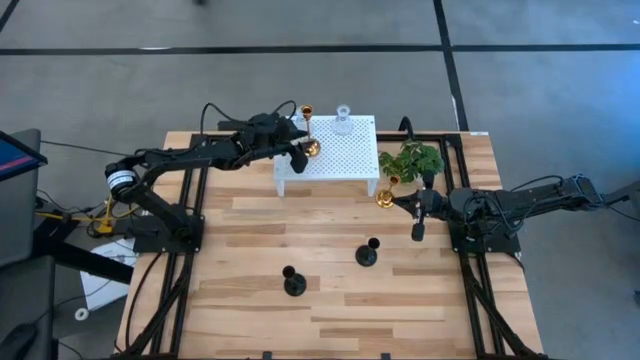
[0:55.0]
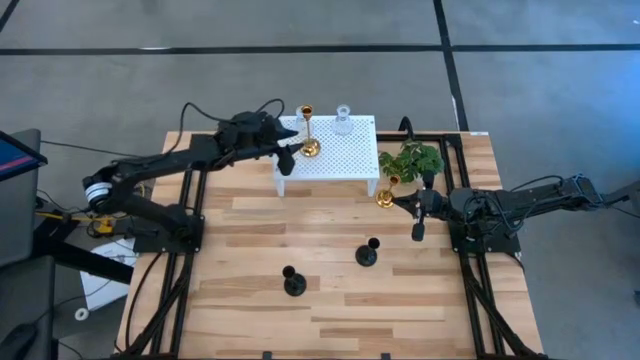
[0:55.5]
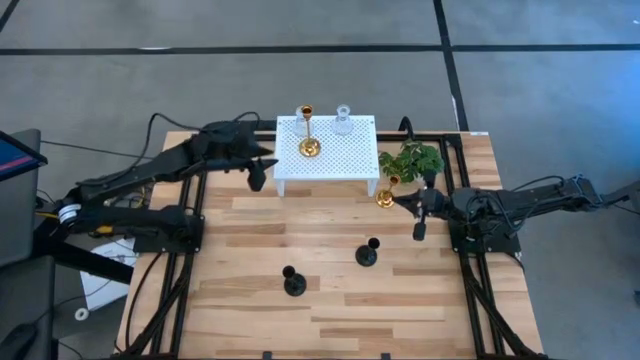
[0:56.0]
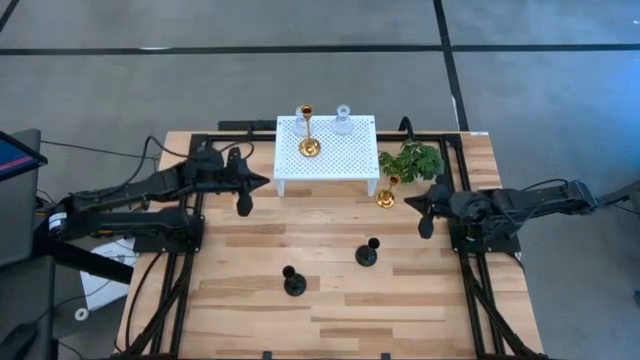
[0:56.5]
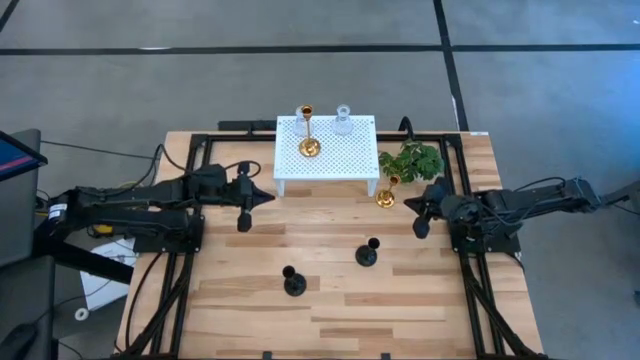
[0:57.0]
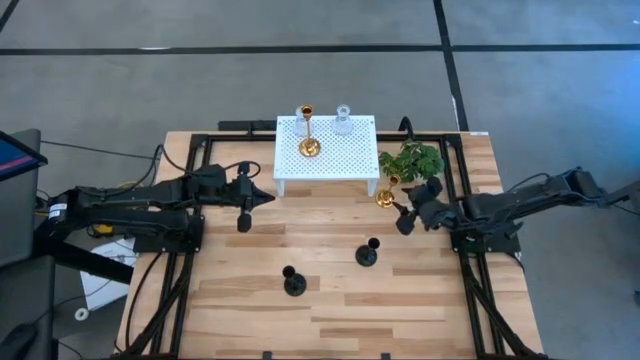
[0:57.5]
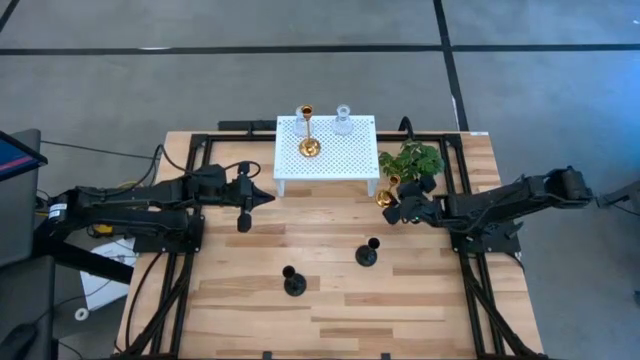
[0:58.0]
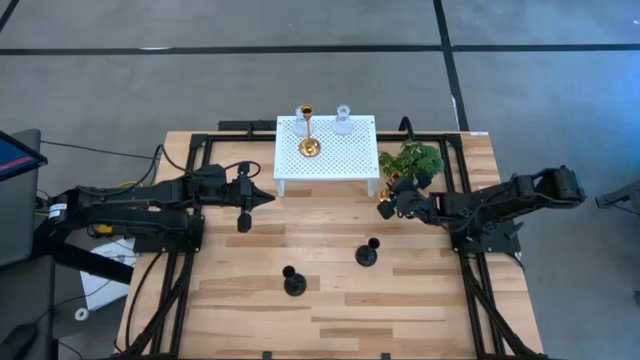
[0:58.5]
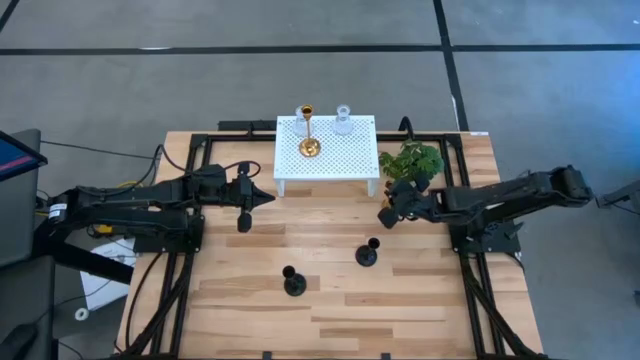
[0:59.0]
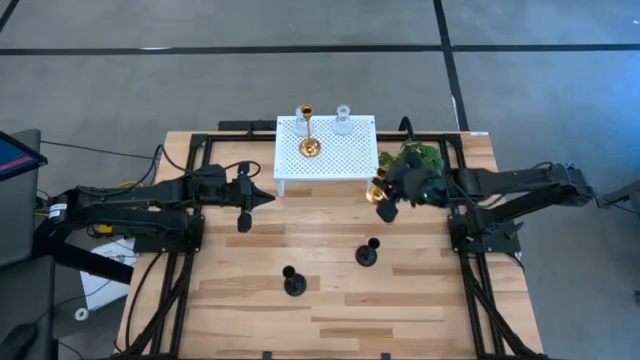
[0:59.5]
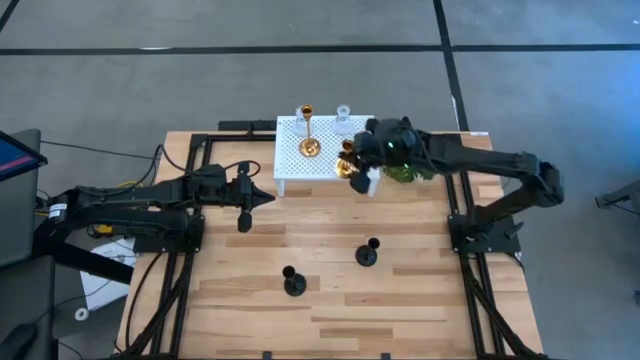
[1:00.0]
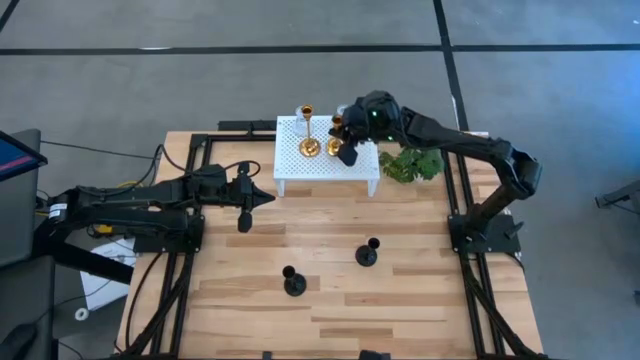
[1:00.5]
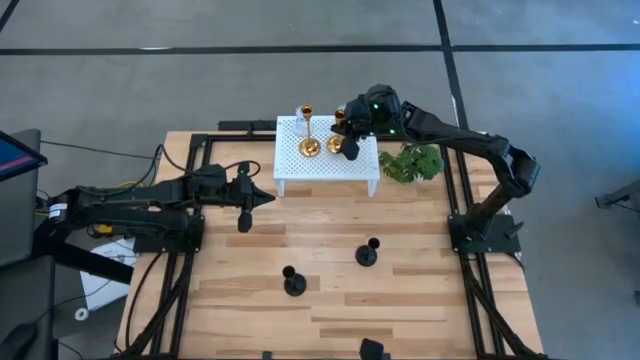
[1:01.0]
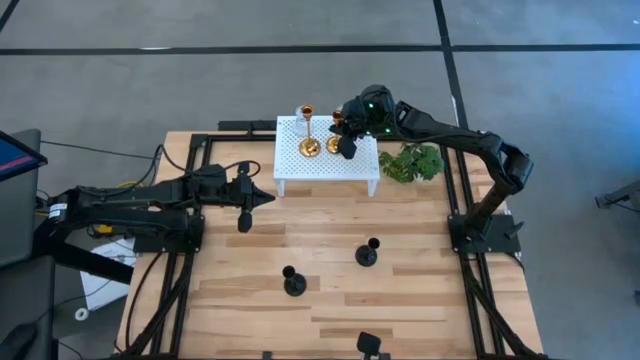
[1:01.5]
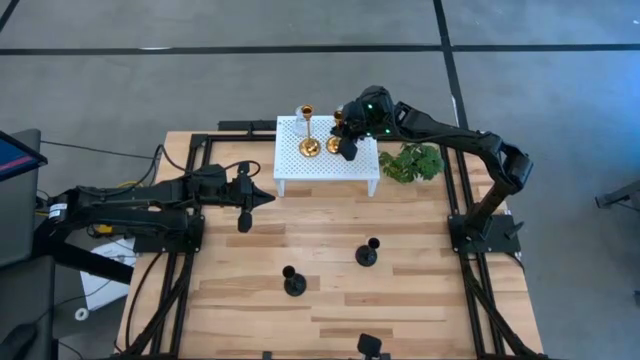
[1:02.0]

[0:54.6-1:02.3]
Task: Pick & Place candle stick holders
Put the gold candle holder on the shelf aligned with the other gold candle holder

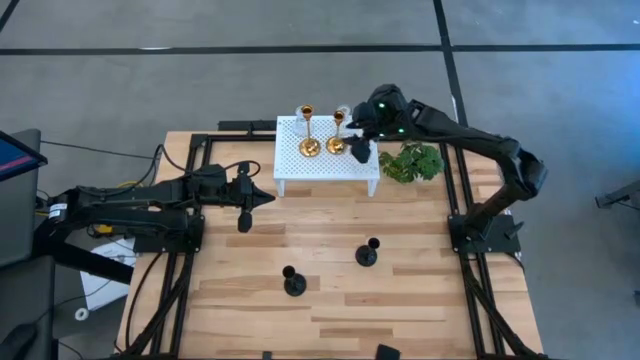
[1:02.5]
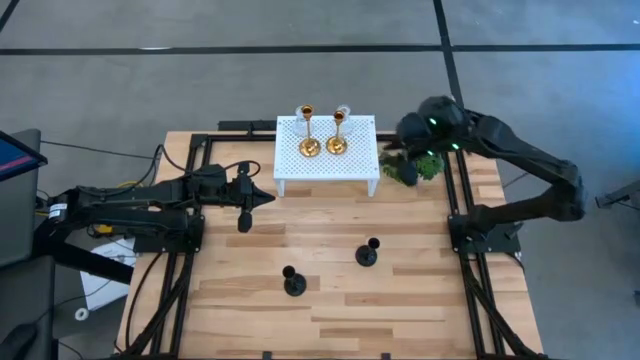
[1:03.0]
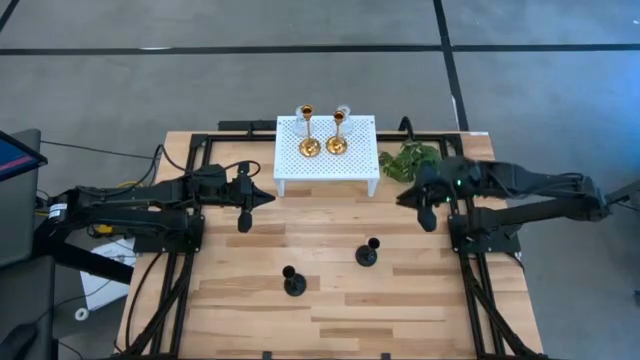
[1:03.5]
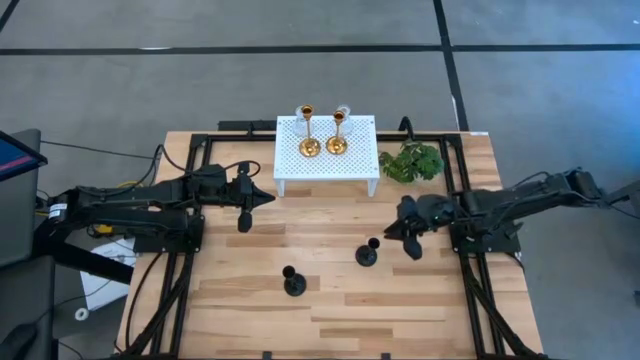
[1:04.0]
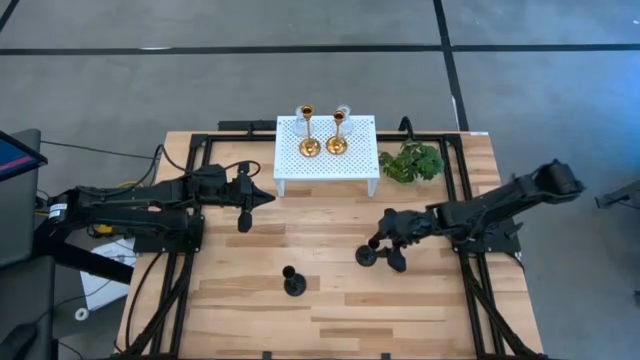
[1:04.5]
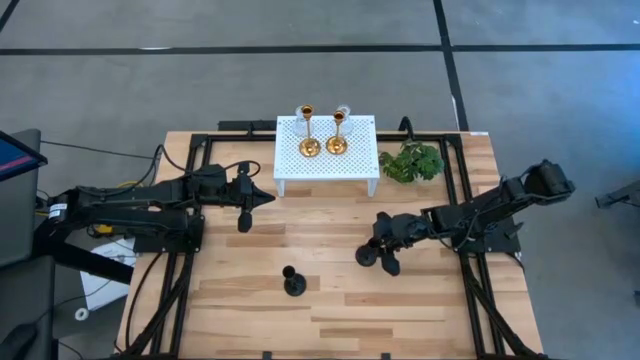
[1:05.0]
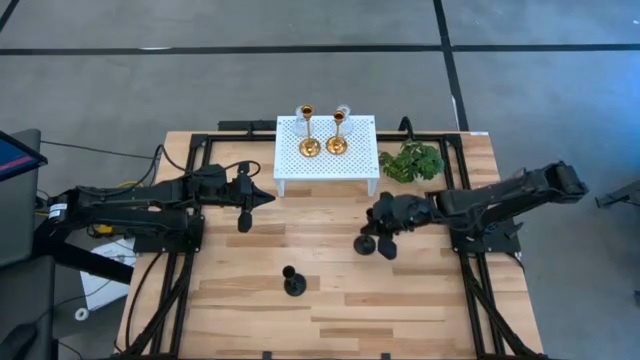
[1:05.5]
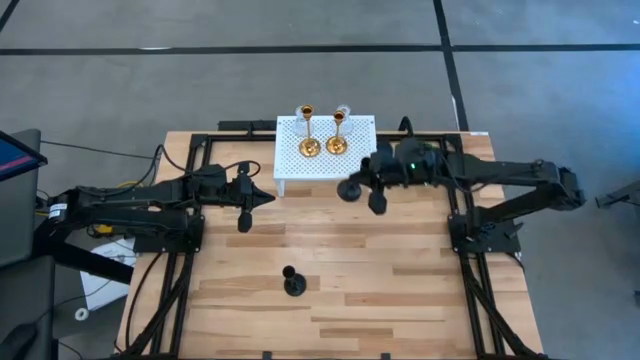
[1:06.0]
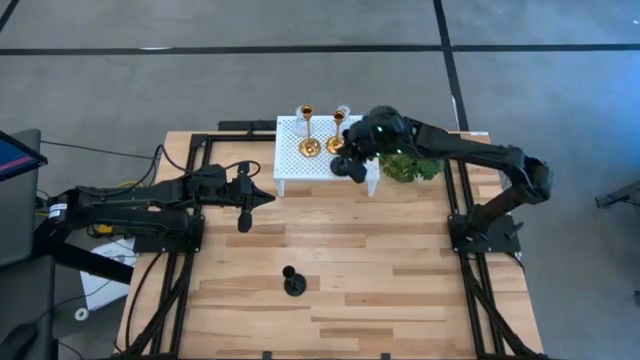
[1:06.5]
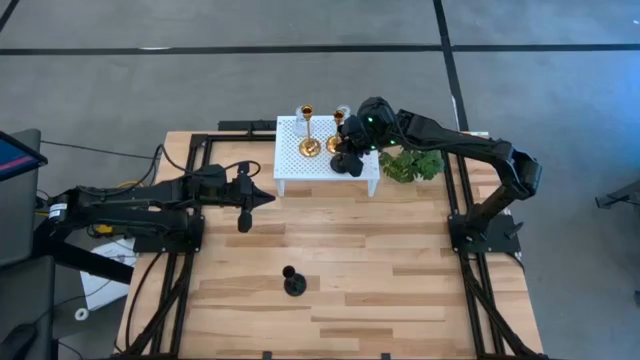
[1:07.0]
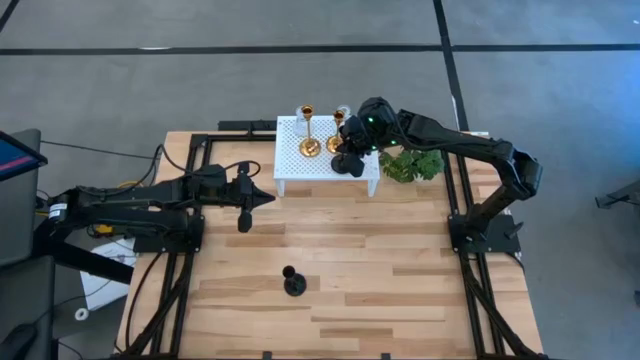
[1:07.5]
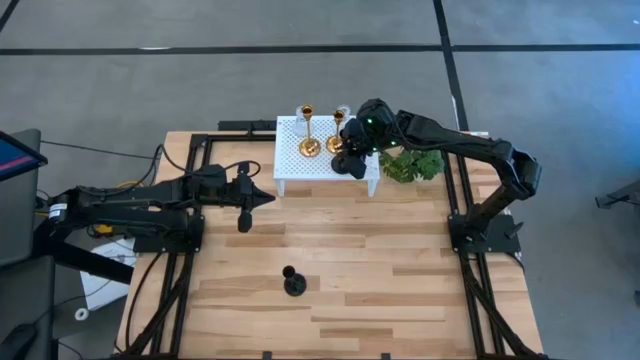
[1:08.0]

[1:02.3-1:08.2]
Put the right black candle holder on the shelf

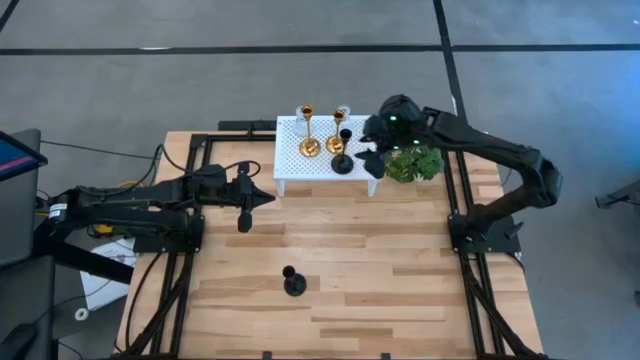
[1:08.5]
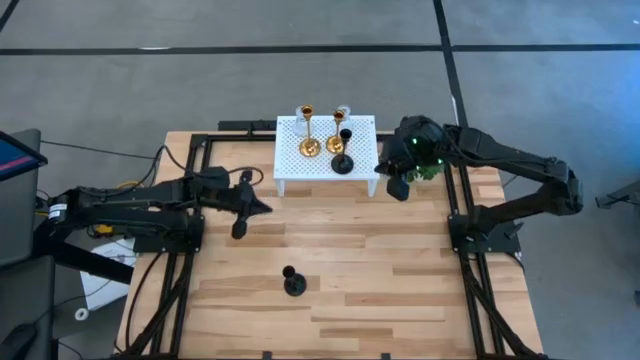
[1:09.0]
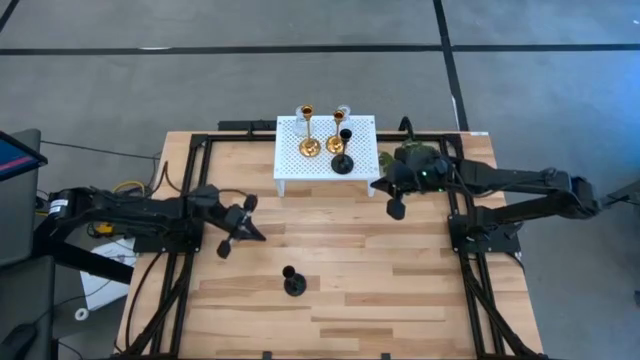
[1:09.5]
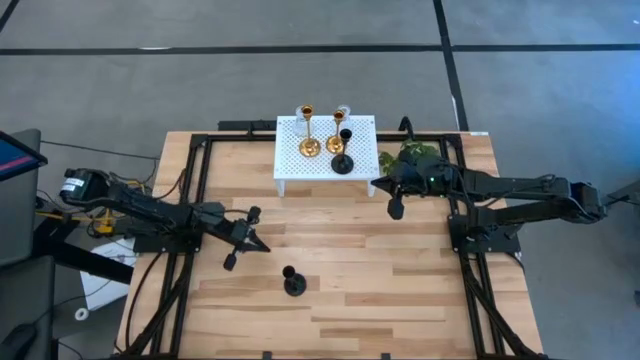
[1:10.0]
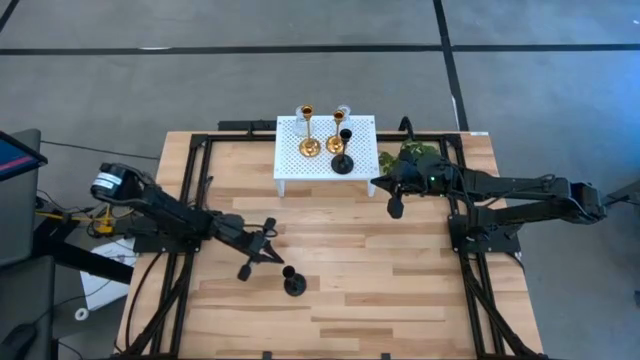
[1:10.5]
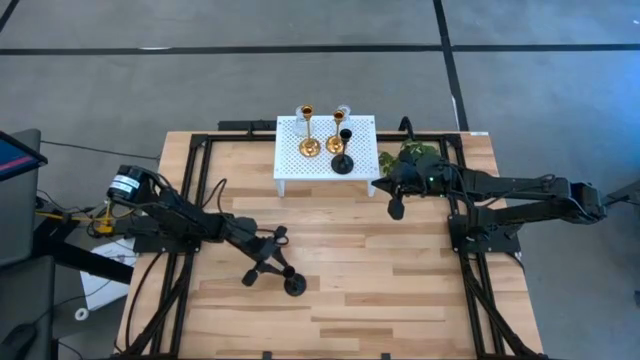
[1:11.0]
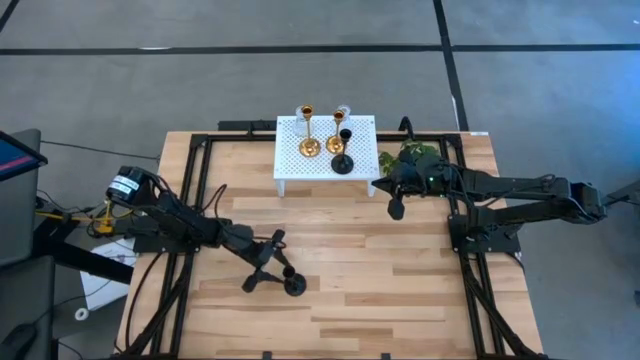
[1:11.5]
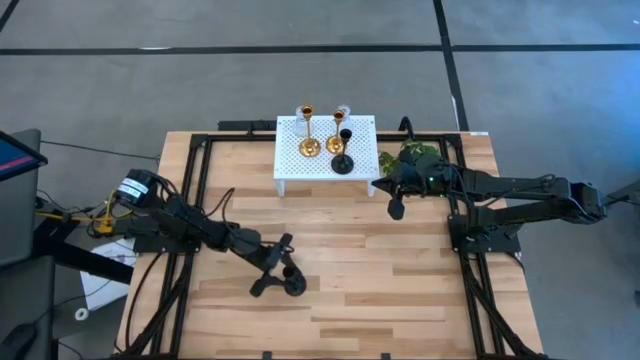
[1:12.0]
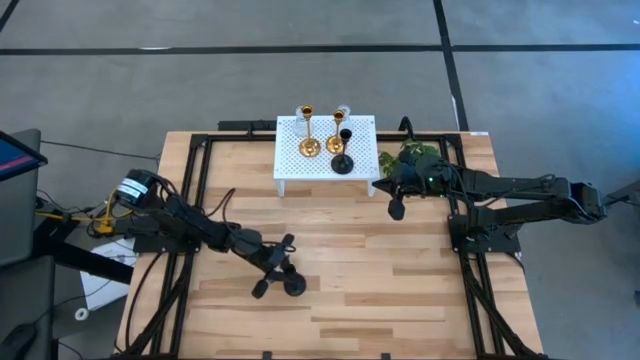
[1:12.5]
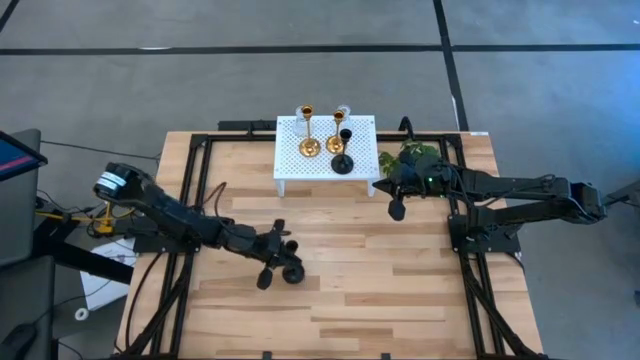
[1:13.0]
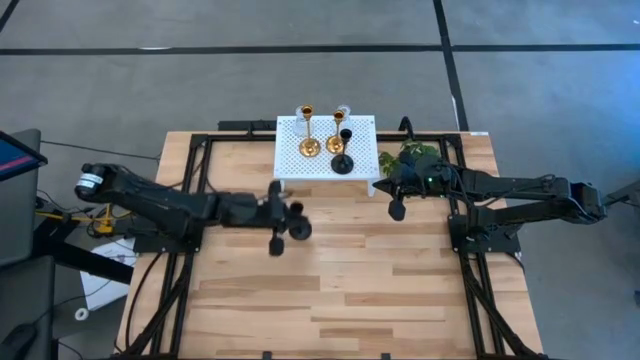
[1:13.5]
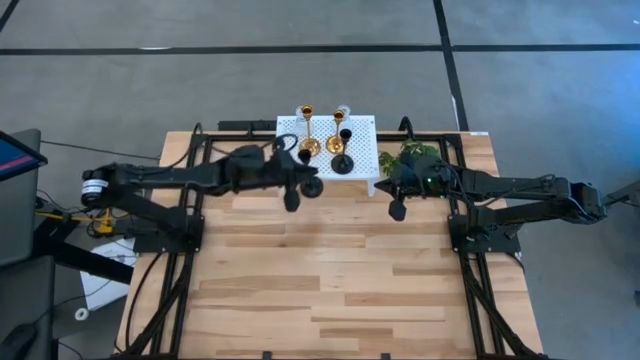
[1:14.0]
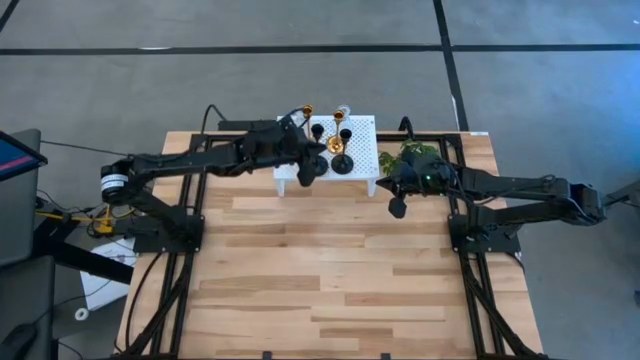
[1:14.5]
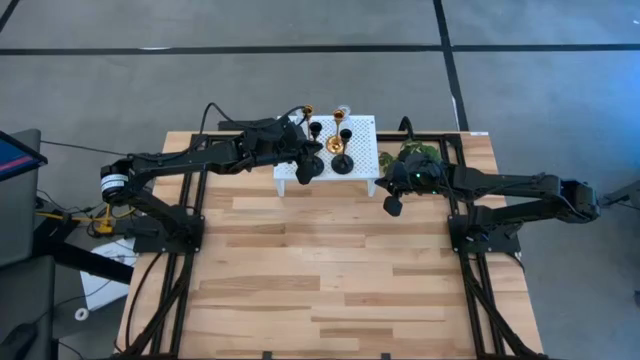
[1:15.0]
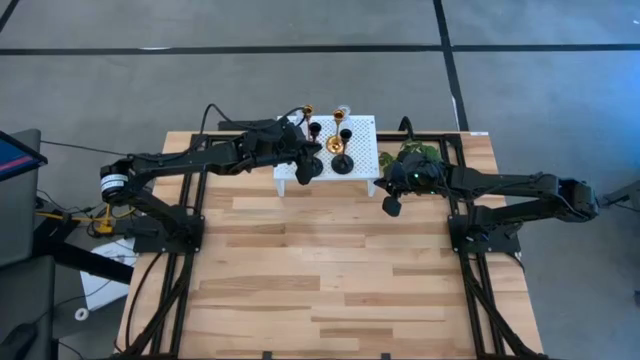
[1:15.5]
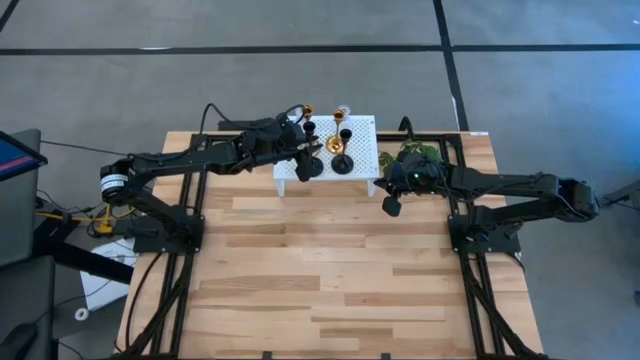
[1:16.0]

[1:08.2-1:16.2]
Put the black candle holder on the shelf aligned with the other black candle holder
